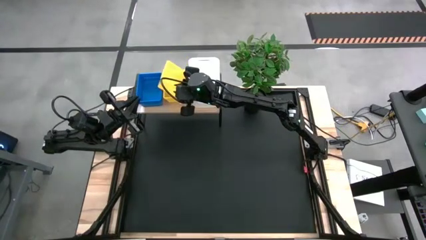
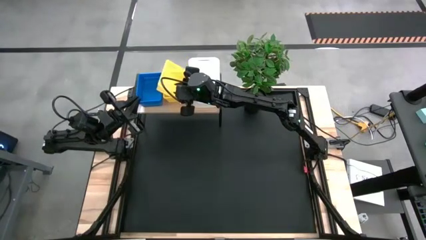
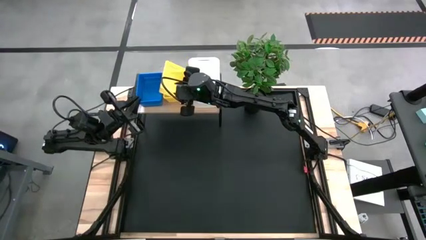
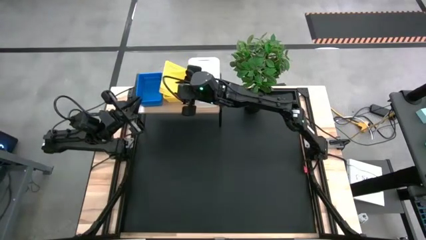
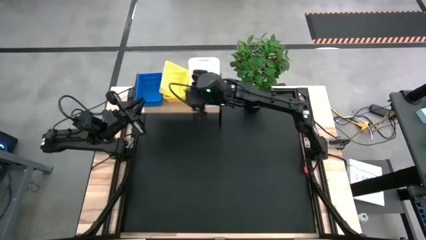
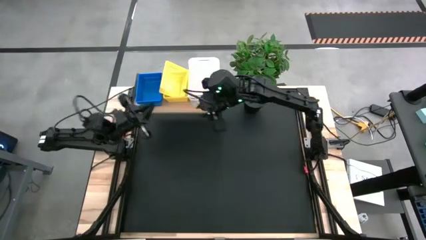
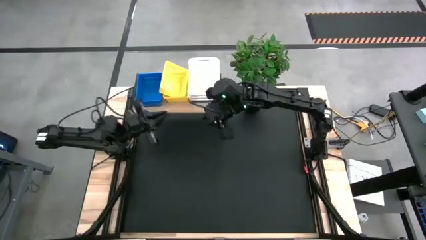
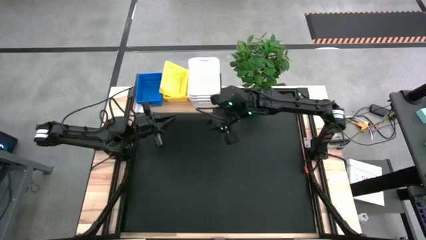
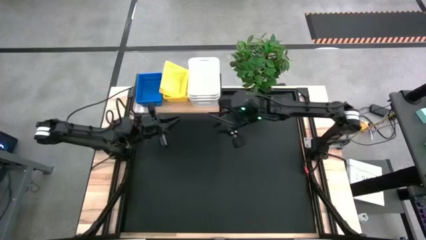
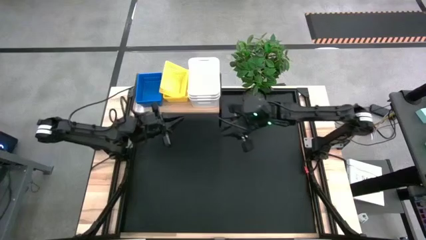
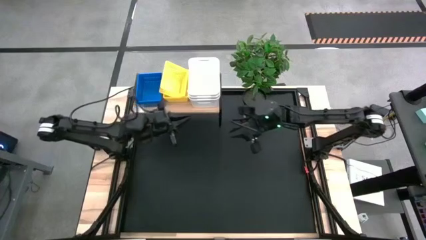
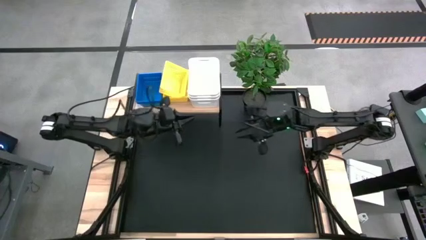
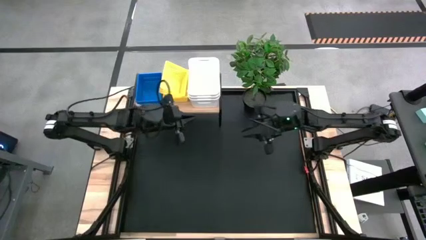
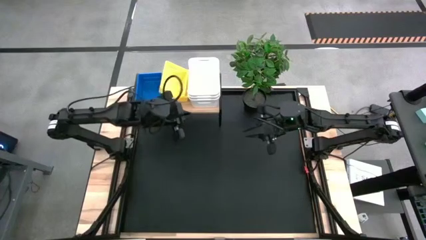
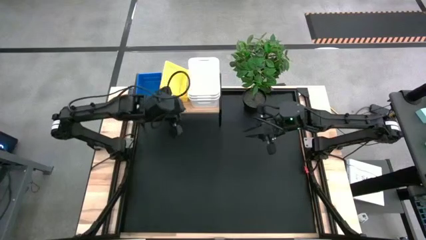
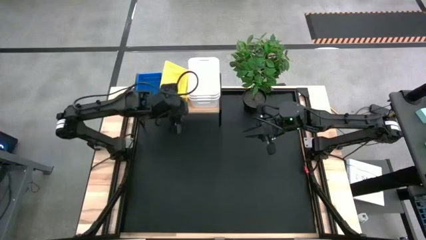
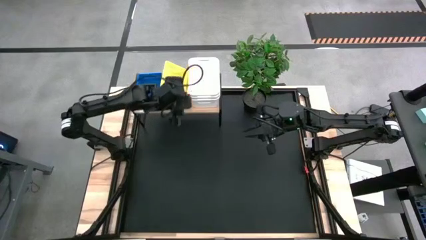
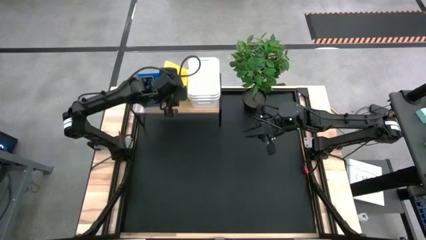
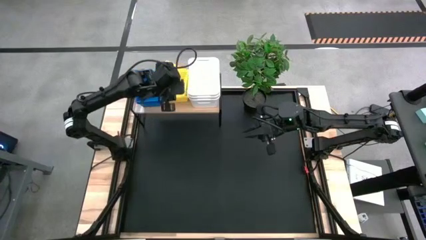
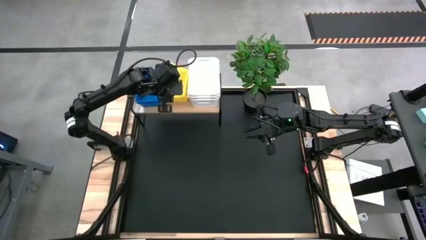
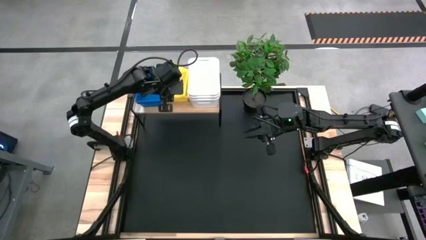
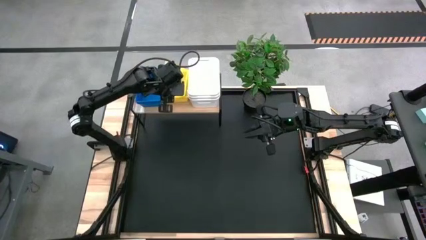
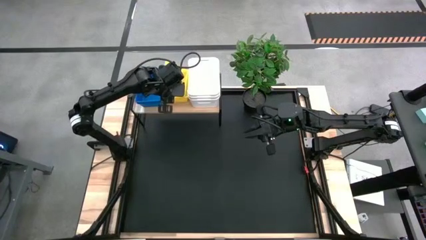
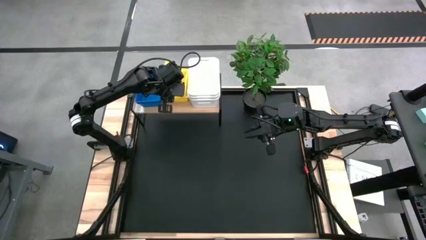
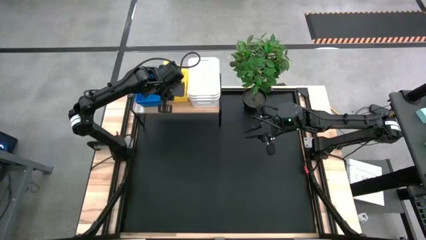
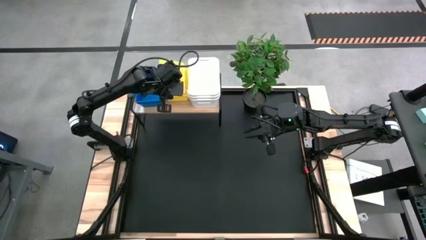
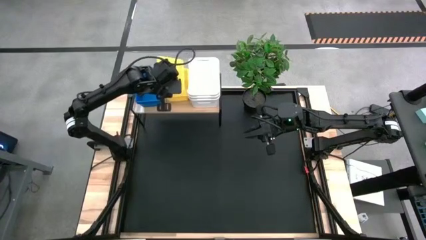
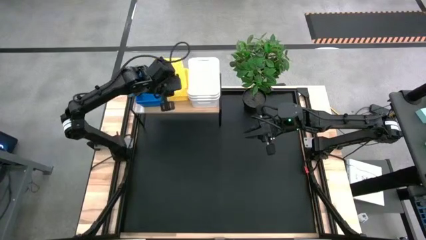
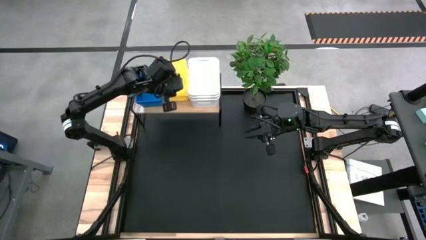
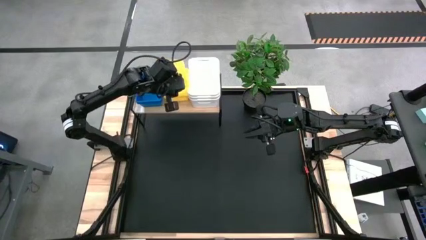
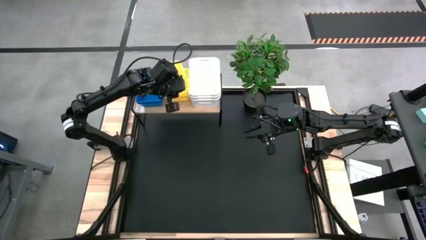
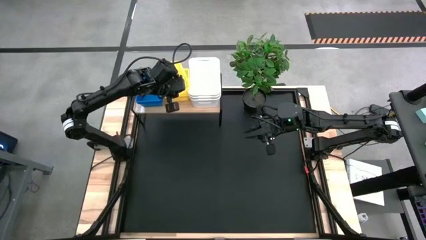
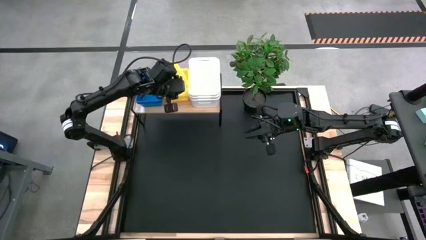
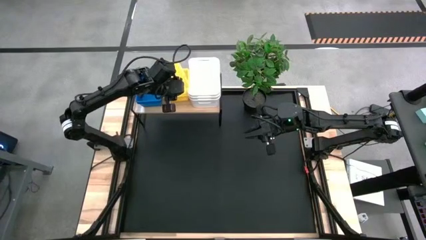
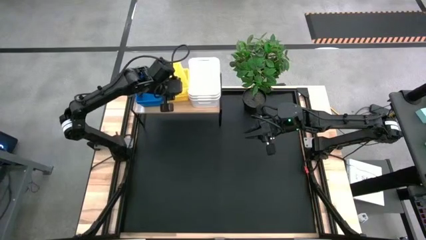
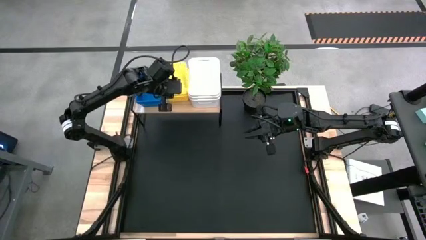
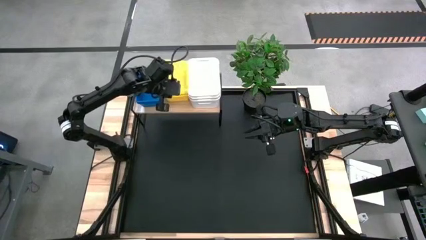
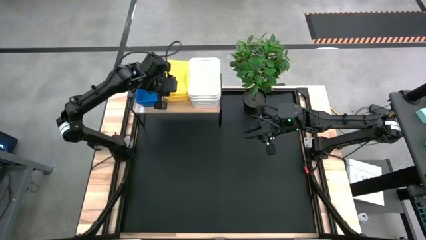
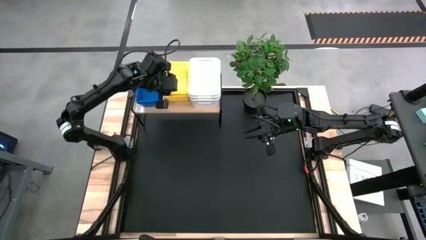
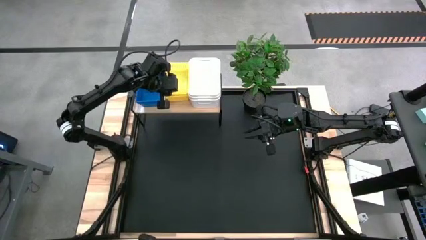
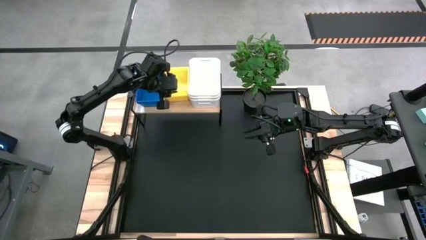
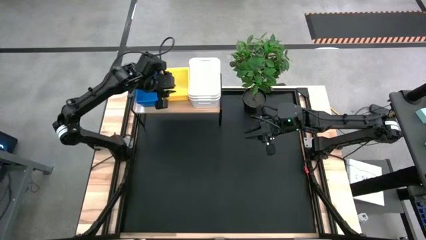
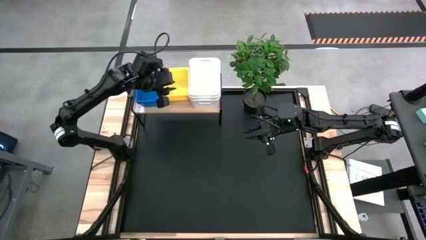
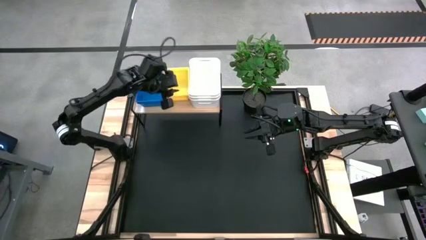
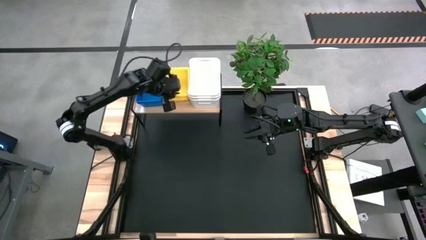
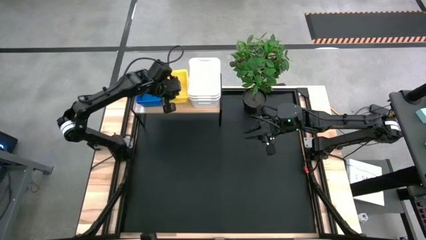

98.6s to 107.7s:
Task: Stack baskets on shelf by color
Stack the yellow bin into the yellow bin on the shelf

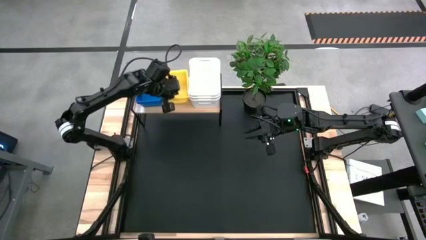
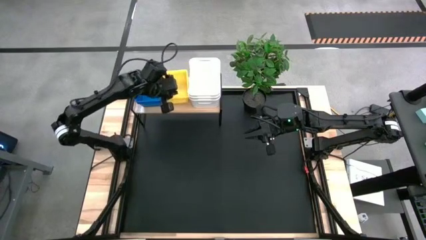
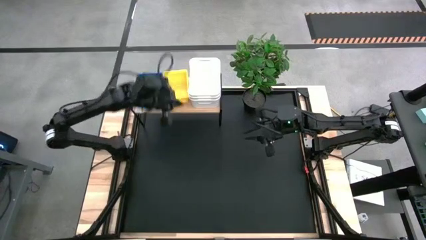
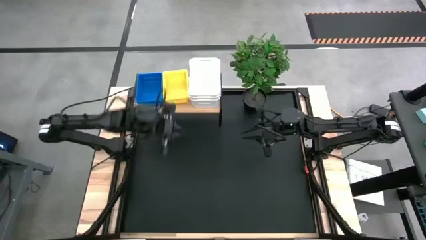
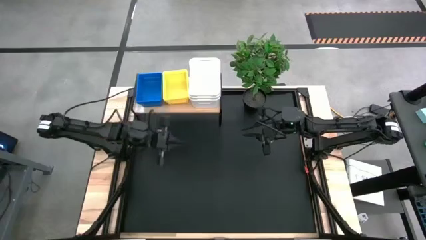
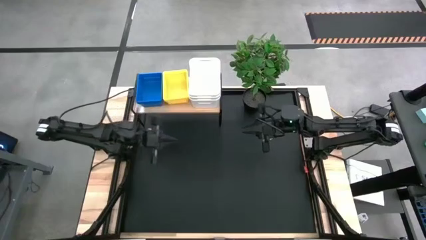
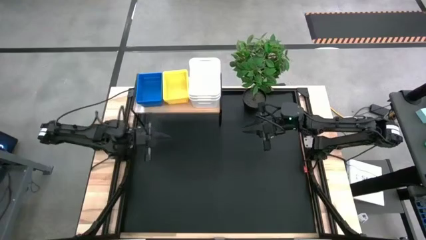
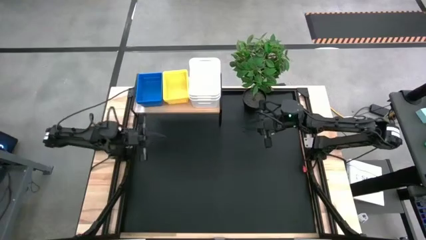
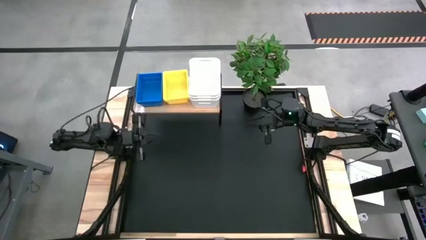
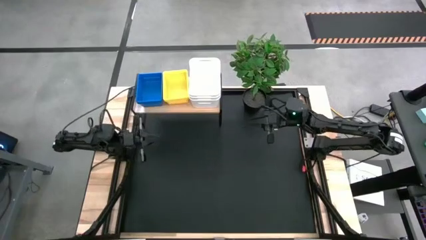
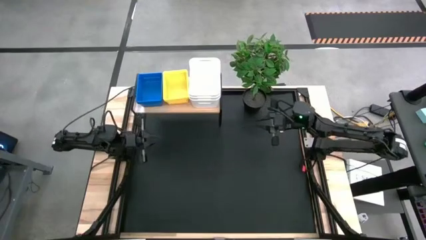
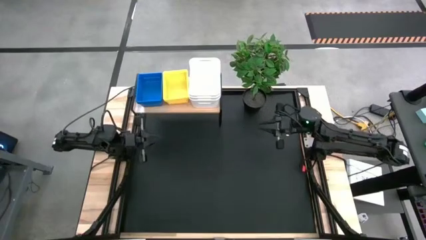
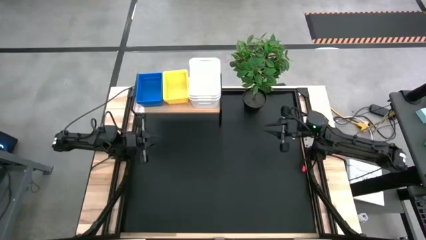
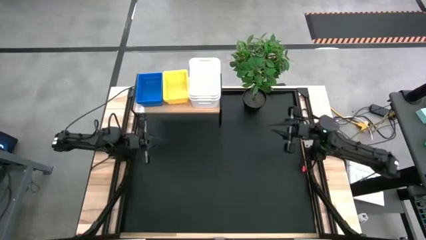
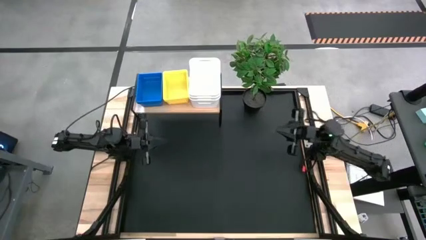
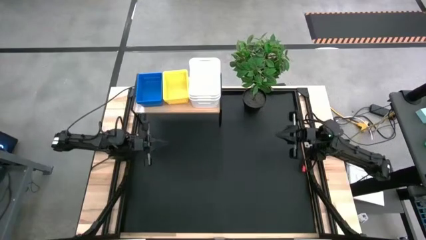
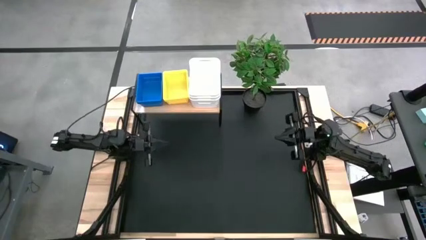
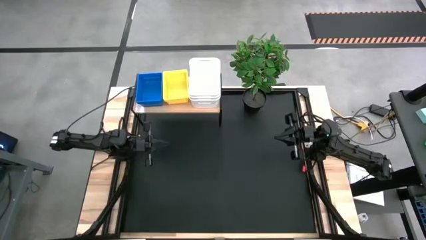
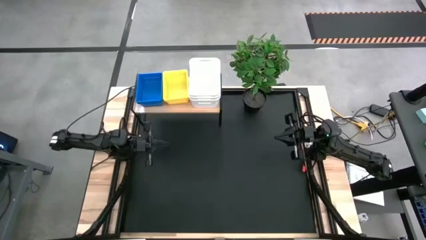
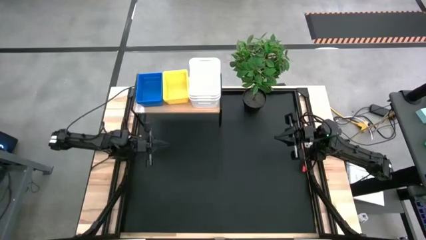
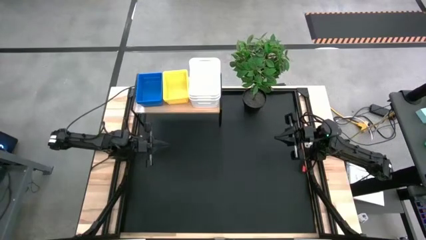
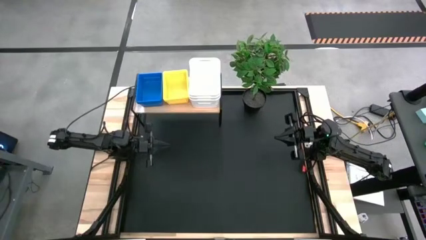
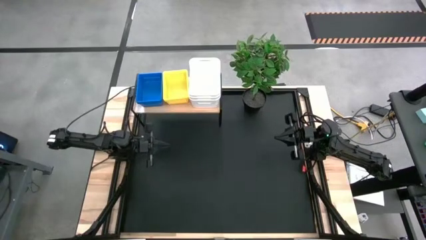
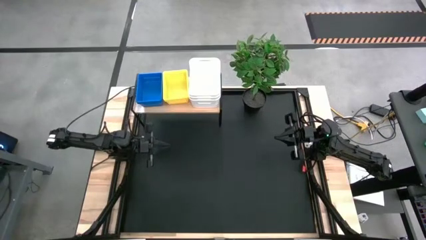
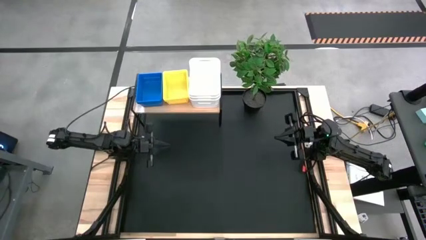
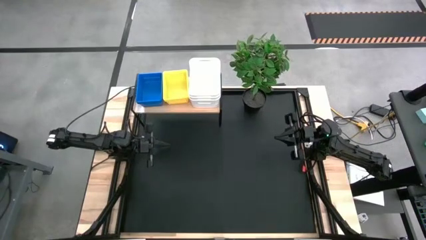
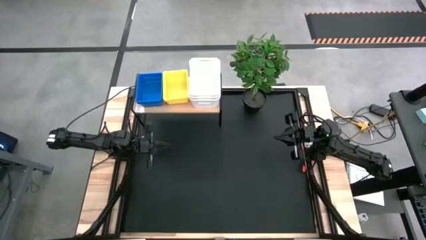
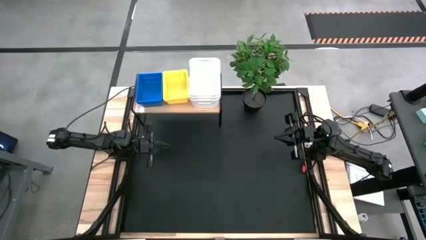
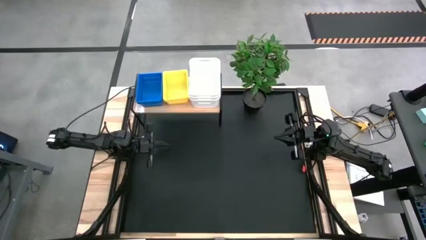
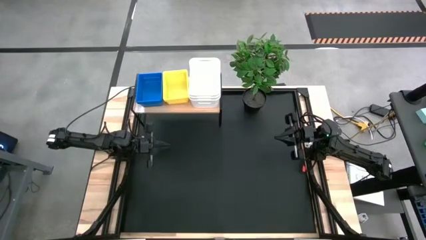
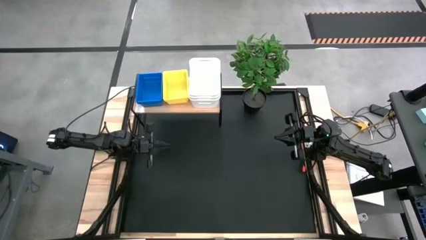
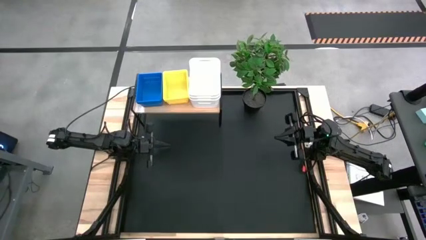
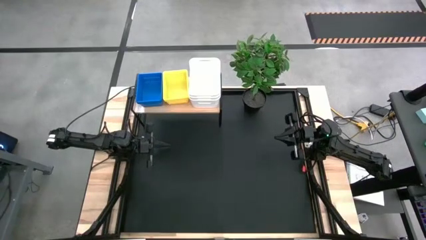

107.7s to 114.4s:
Return to Home Position
